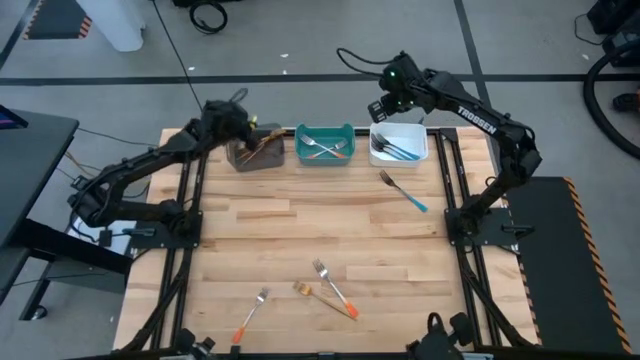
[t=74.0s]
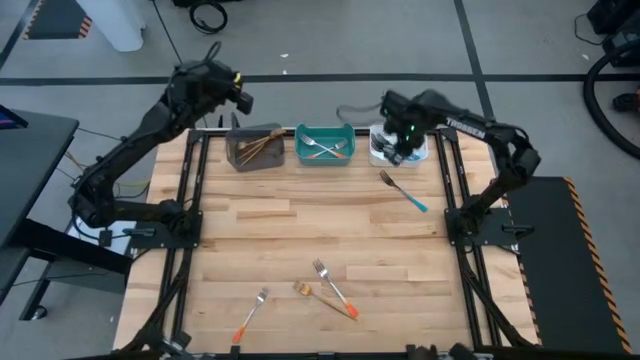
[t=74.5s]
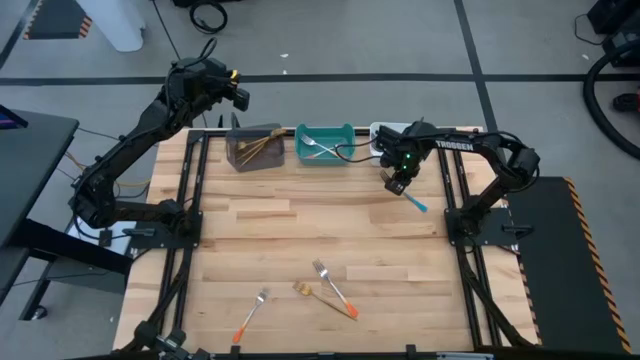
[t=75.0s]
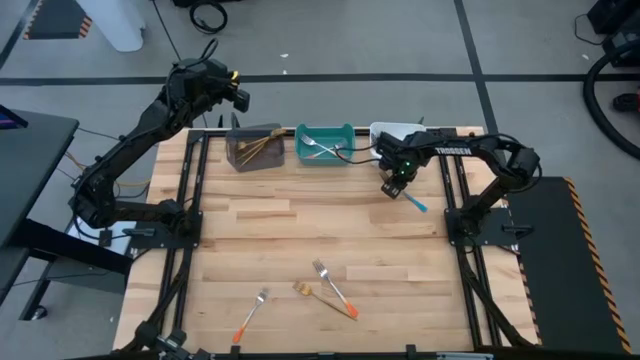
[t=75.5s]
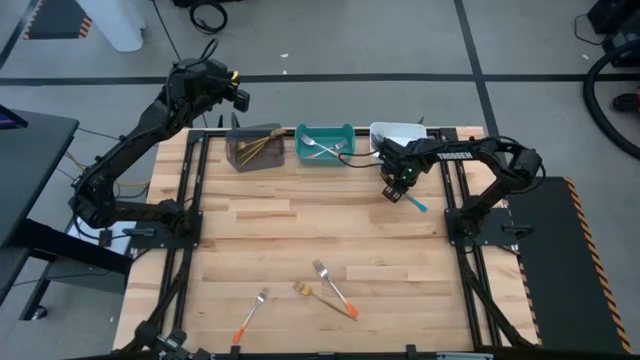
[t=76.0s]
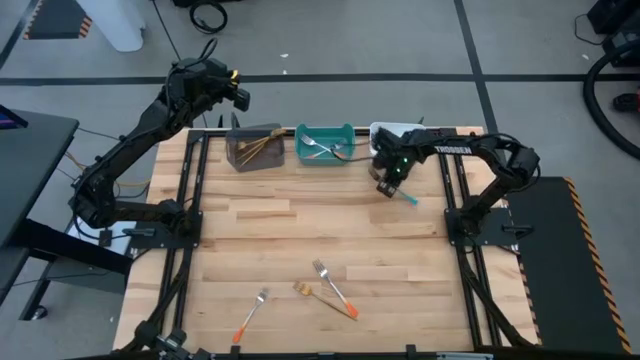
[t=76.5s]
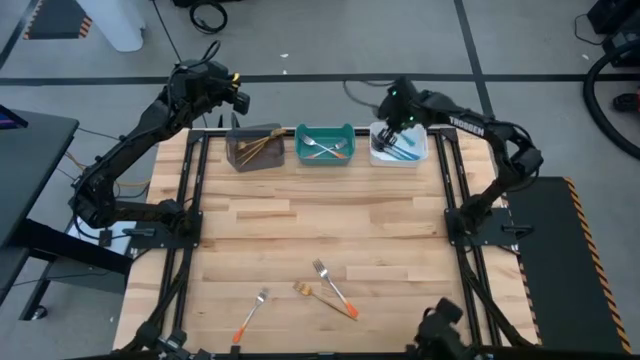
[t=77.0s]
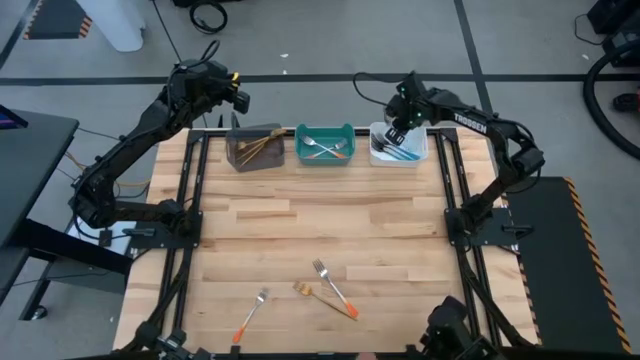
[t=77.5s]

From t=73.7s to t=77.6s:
Task: Sort silverware by color (type)
Put the blue fork into the white bin

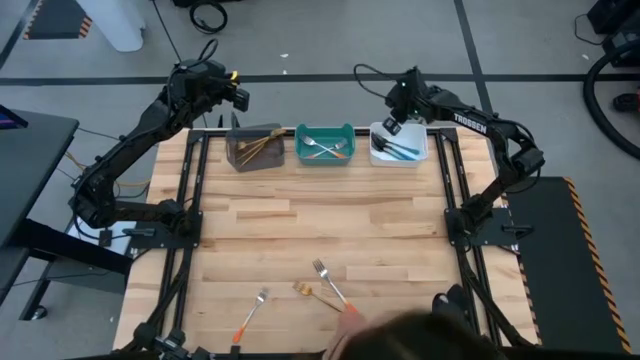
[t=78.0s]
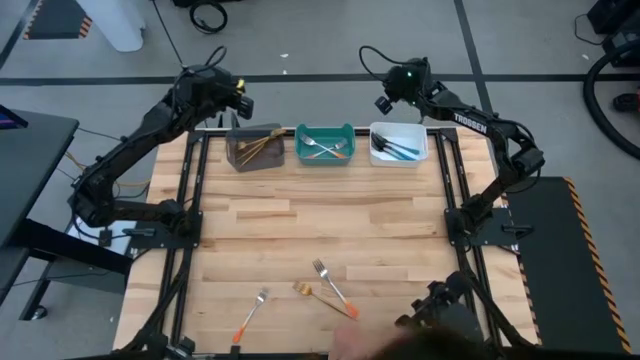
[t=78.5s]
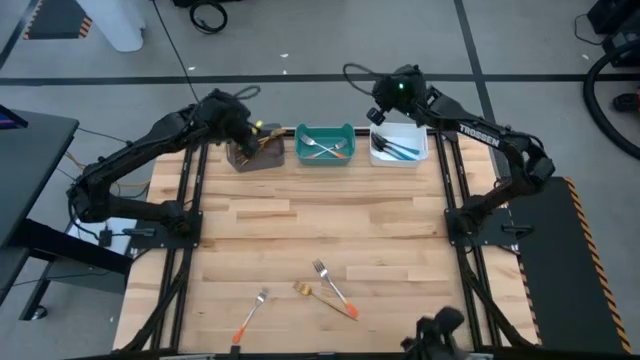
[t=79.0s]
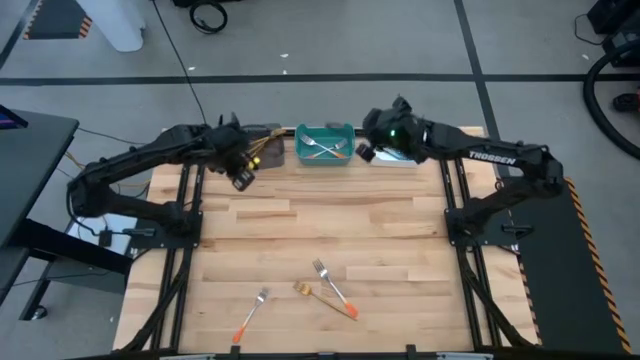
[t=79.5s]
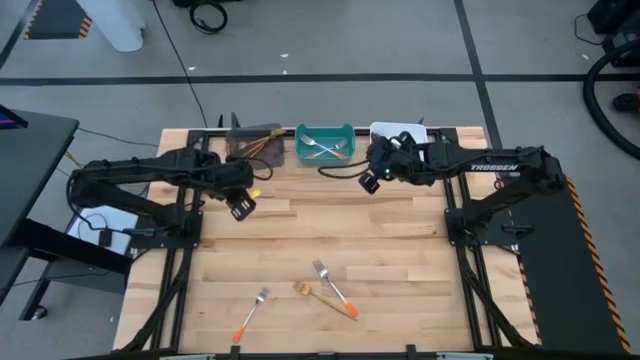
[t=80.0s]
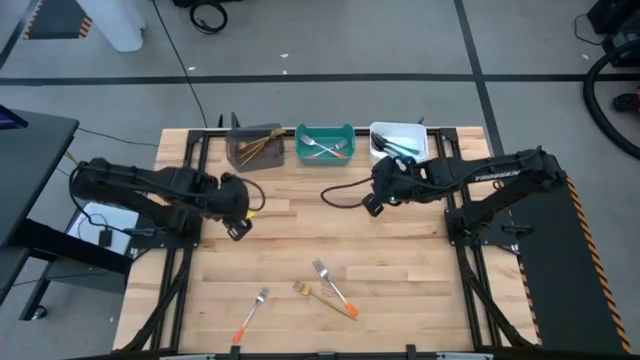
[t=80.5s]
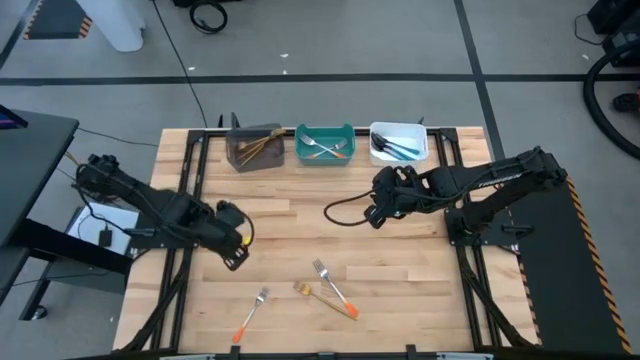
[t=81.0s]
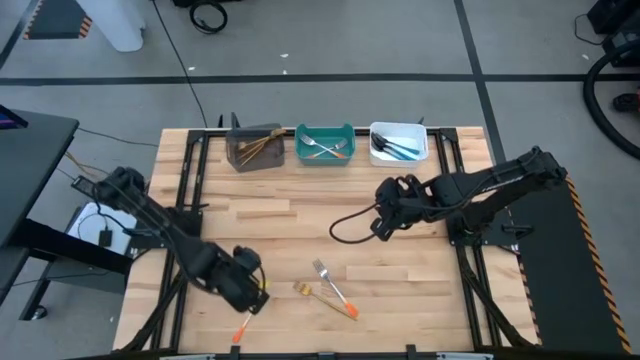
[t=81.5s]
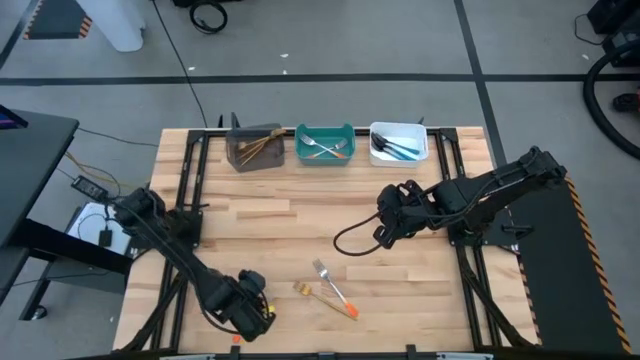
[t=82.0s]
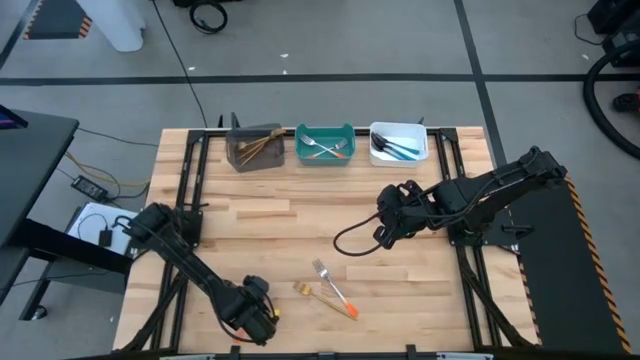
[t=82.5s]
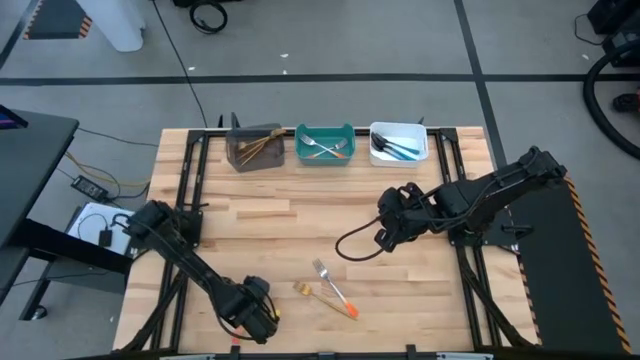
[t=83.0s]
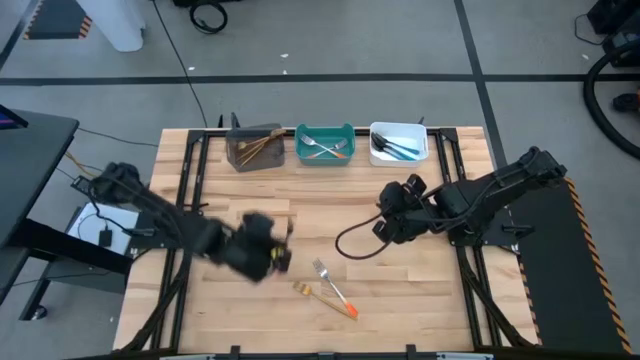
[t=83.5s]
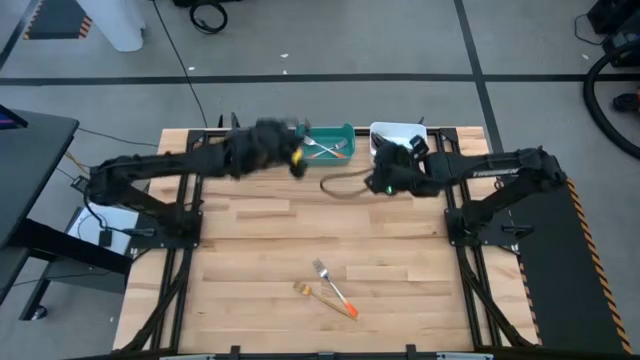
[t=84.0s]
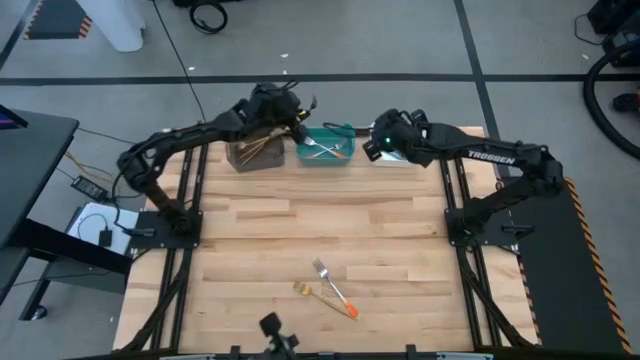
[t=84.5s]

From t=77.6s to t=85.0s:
Put the orange fork into the blue bin

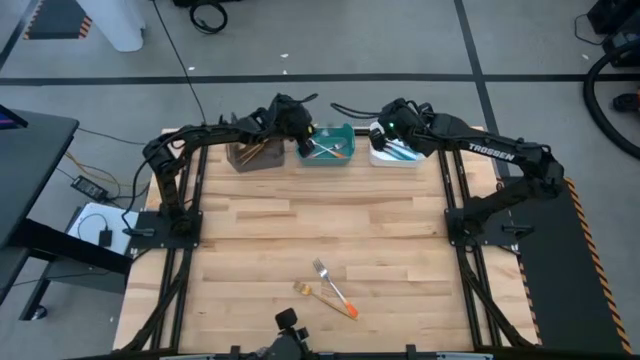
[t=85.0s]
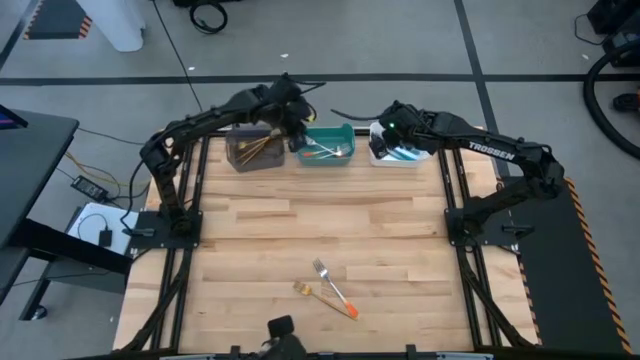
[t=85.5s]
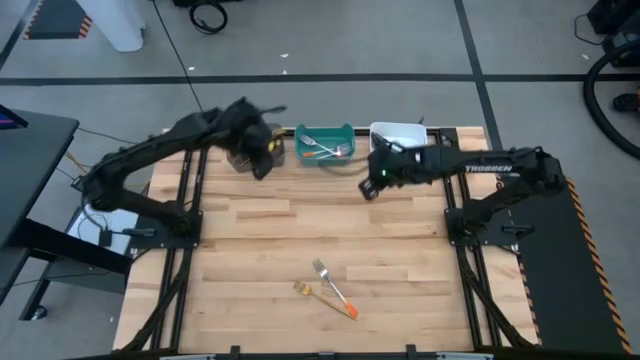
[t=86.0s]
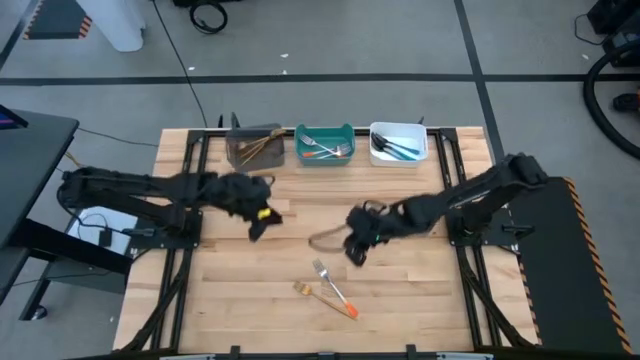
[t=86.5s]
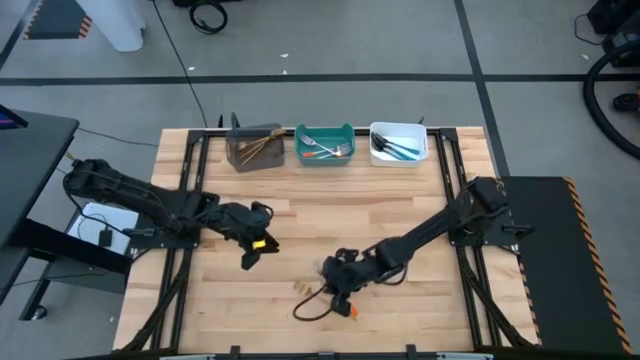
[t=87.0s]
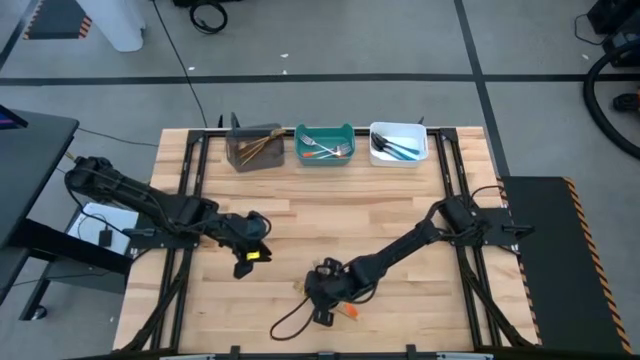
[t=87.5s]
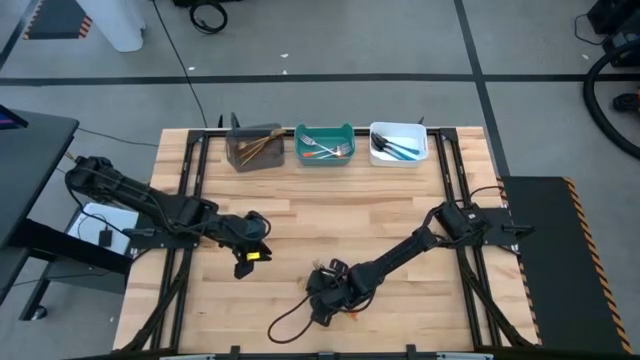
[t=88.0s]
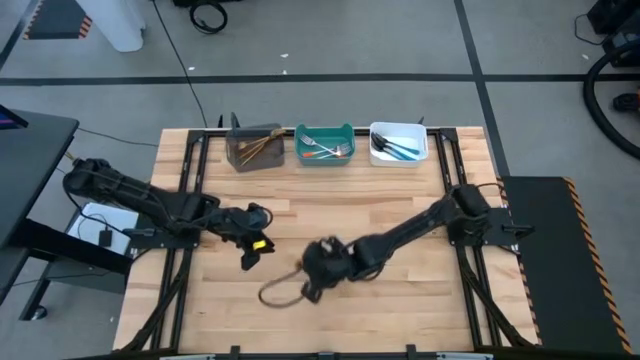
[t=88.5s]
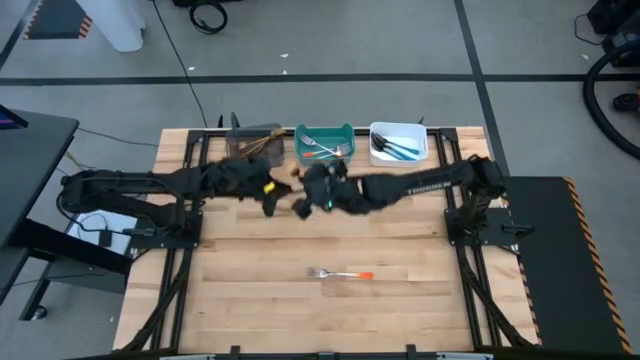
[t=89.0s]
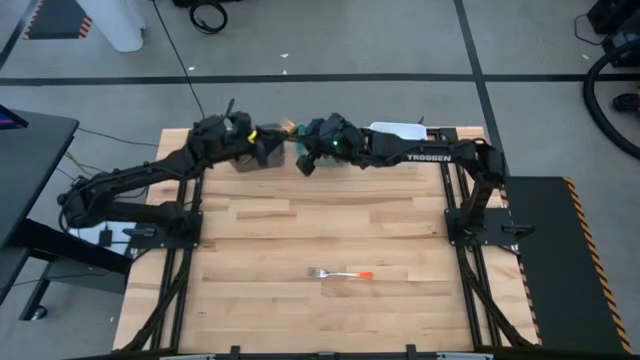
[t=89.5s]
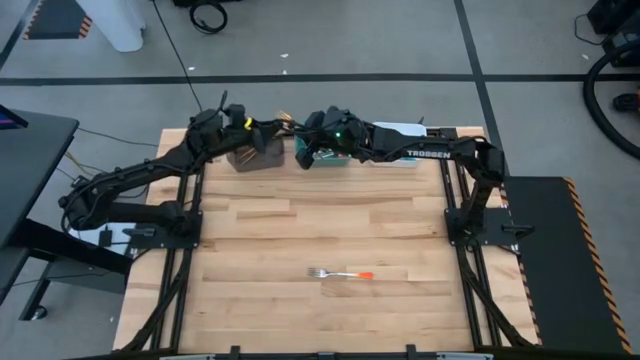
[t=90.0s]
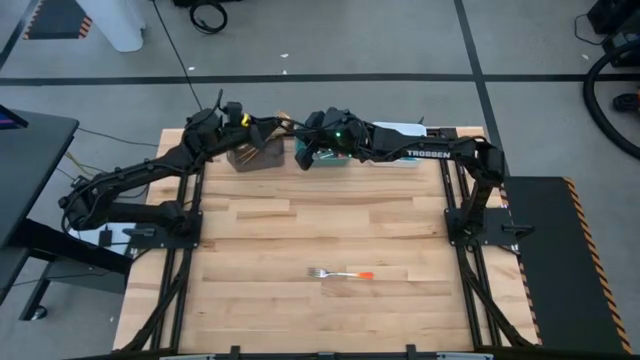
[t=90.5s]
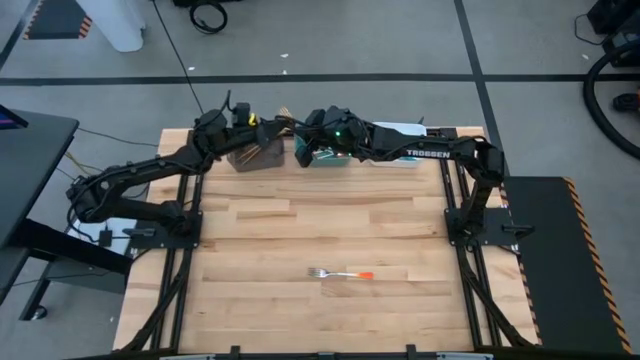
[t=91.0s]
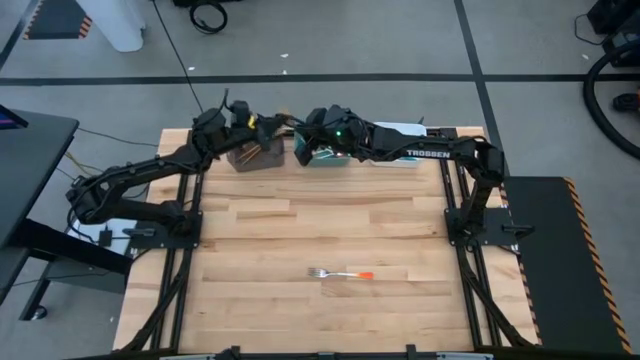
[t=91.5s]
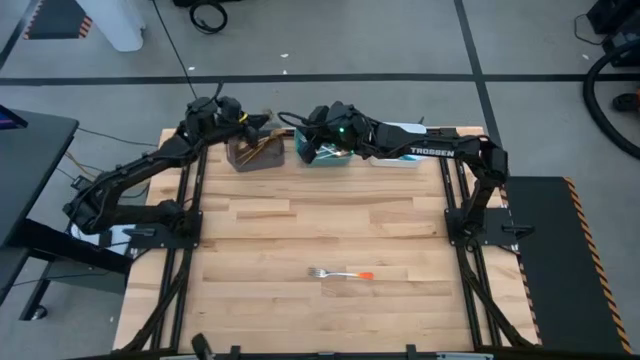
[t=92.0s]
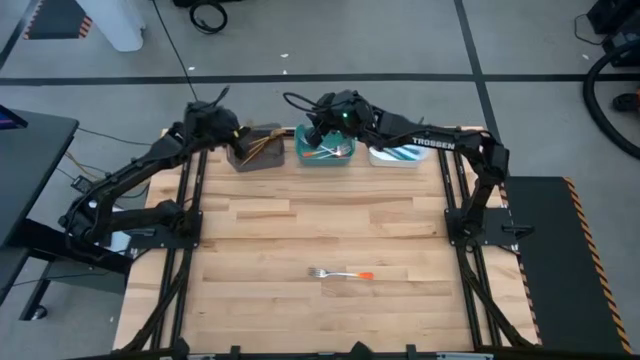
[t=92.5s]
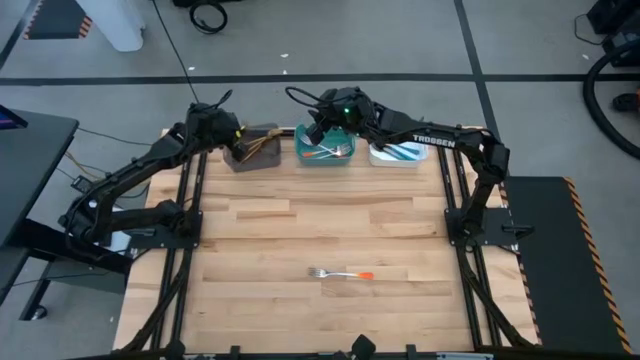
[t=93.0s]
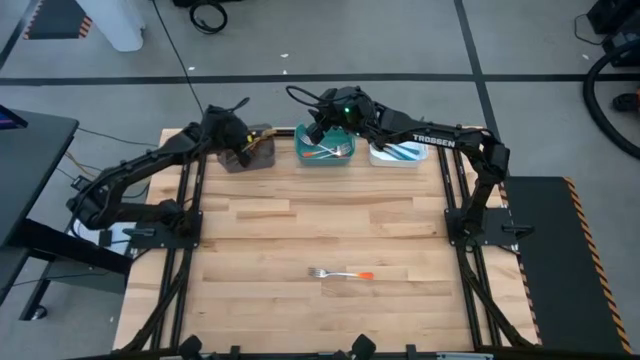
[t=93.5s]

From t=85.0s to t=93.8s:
Put the gold fork into the black bin
